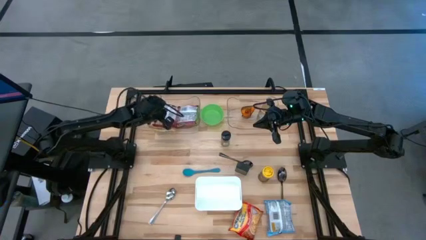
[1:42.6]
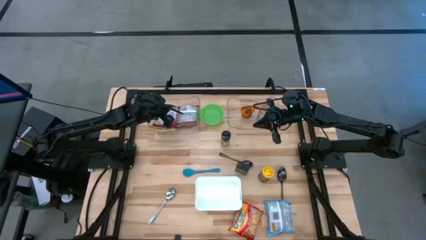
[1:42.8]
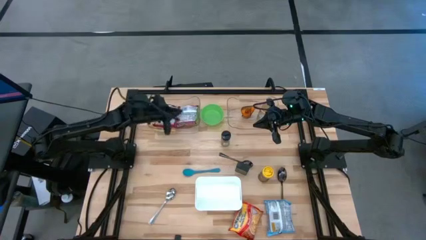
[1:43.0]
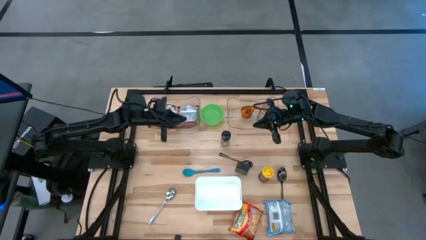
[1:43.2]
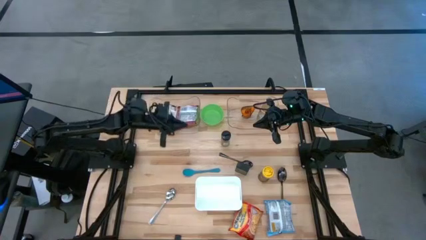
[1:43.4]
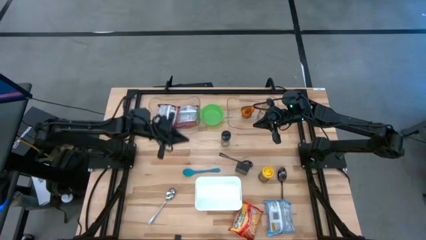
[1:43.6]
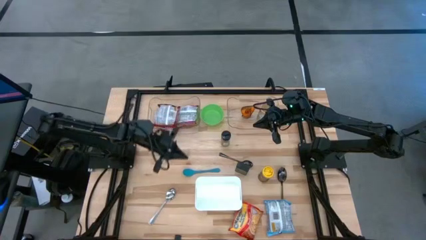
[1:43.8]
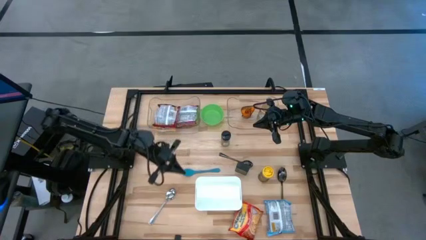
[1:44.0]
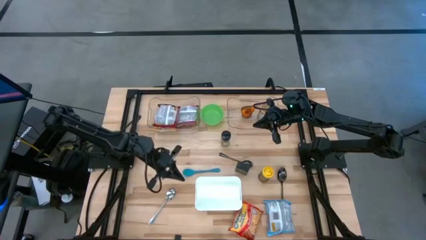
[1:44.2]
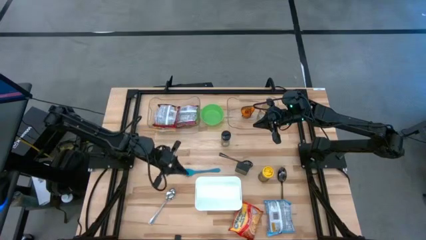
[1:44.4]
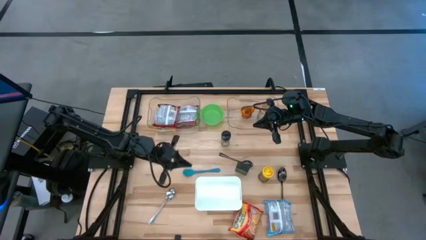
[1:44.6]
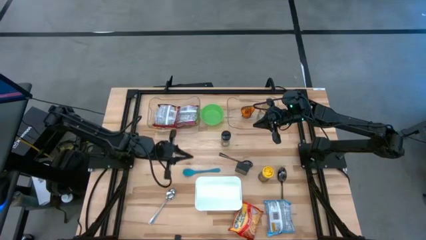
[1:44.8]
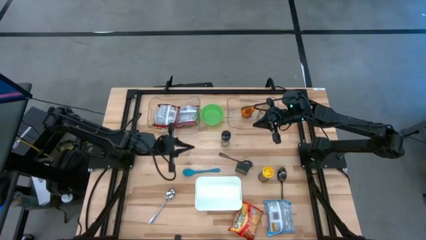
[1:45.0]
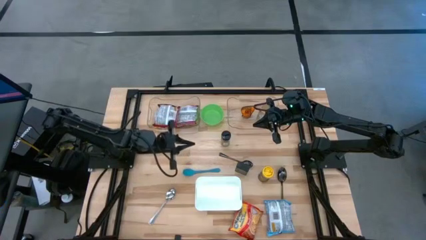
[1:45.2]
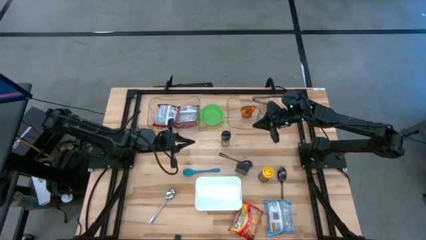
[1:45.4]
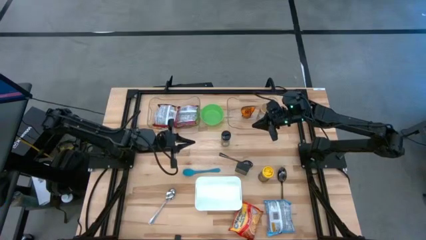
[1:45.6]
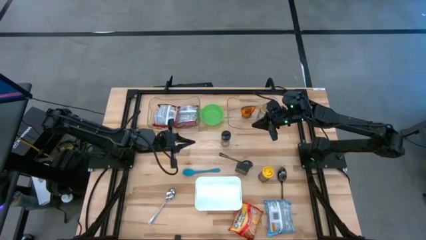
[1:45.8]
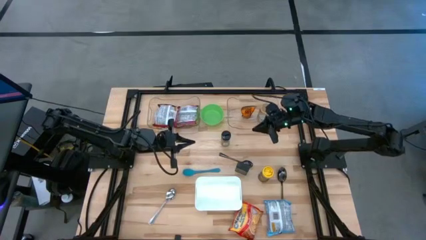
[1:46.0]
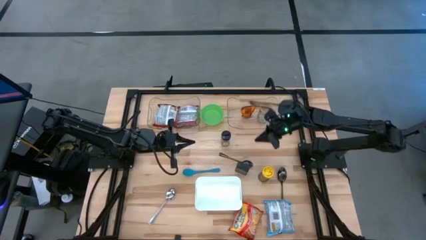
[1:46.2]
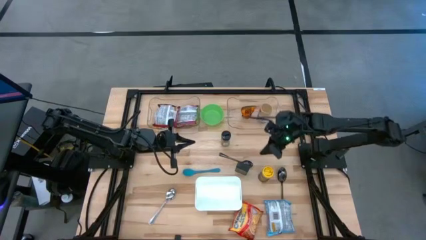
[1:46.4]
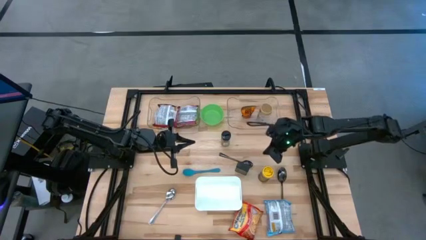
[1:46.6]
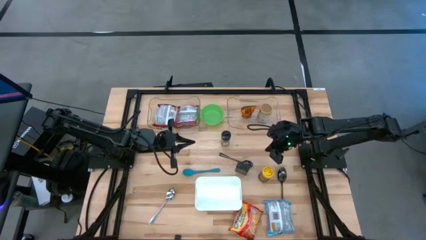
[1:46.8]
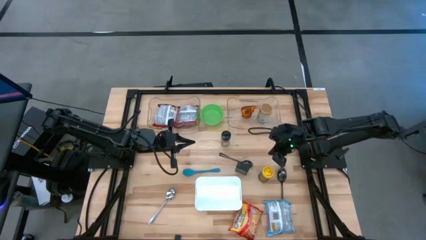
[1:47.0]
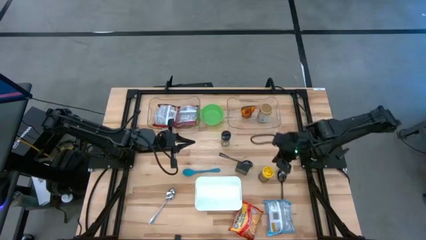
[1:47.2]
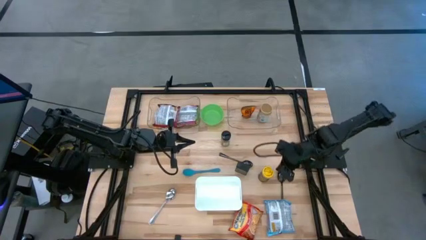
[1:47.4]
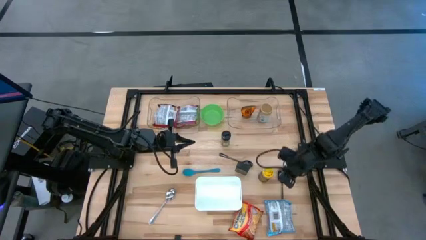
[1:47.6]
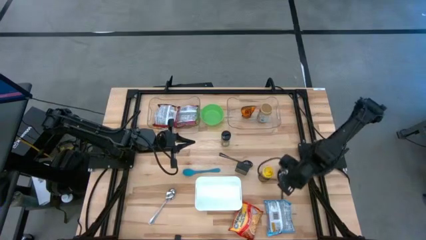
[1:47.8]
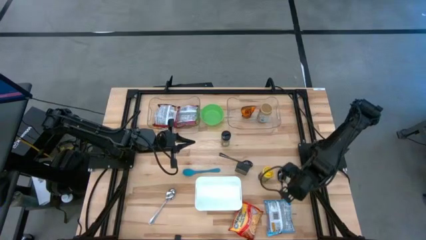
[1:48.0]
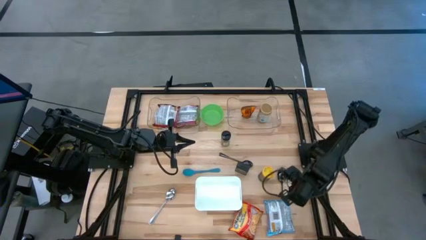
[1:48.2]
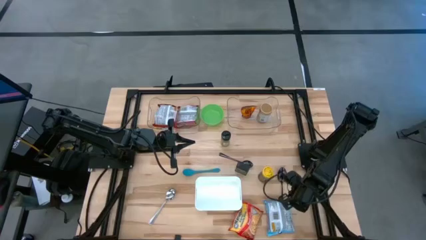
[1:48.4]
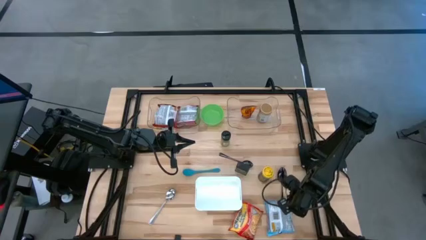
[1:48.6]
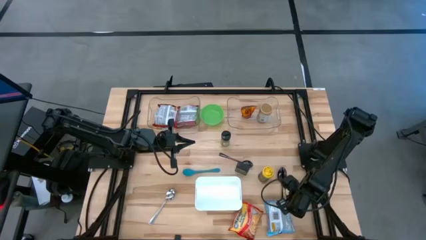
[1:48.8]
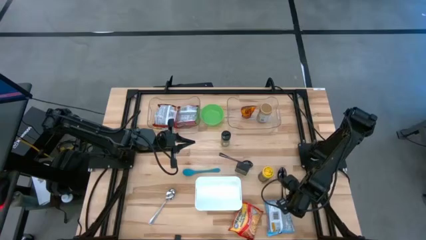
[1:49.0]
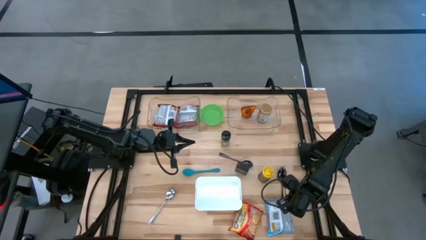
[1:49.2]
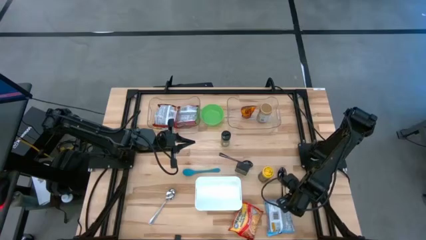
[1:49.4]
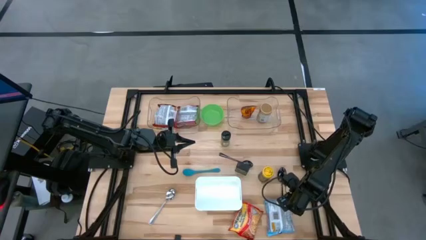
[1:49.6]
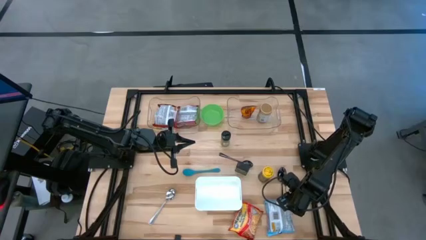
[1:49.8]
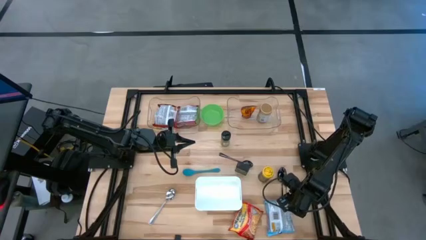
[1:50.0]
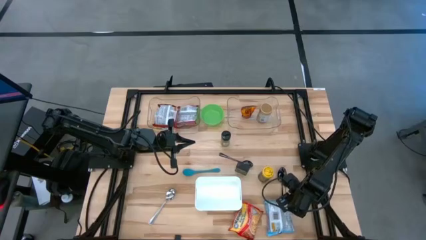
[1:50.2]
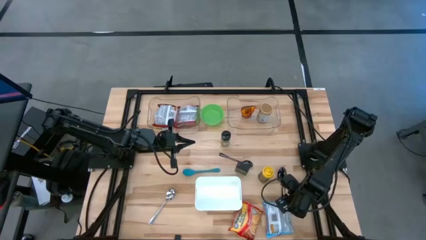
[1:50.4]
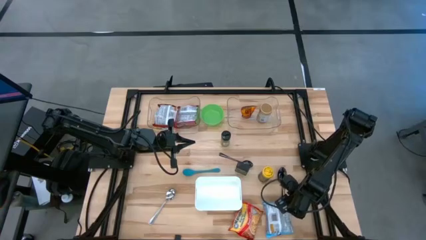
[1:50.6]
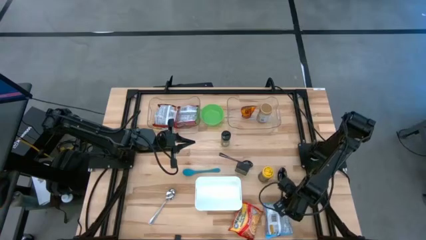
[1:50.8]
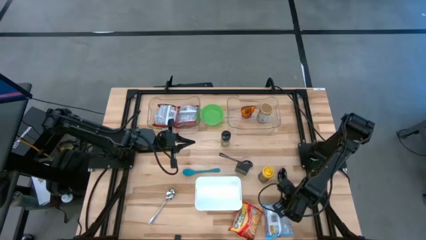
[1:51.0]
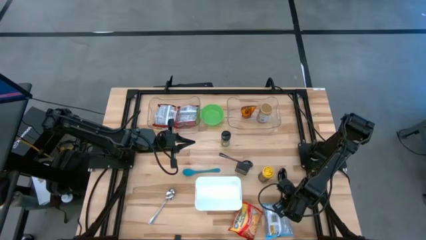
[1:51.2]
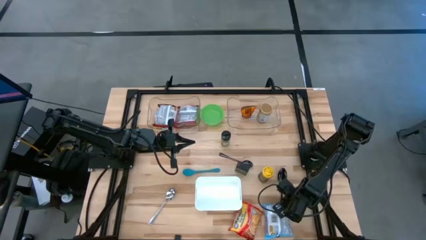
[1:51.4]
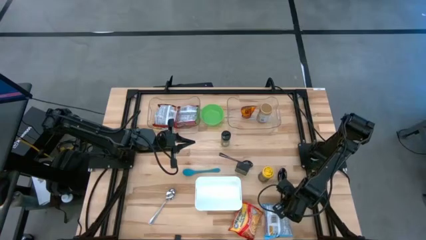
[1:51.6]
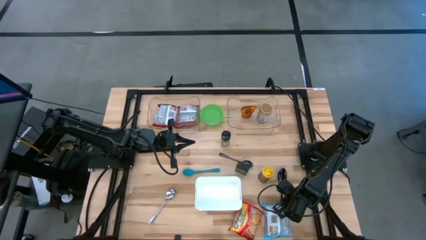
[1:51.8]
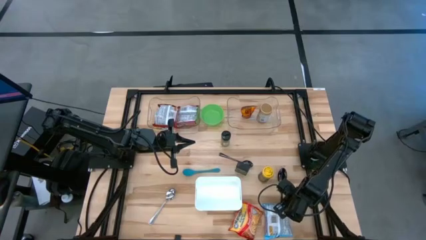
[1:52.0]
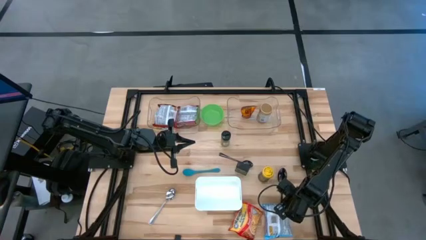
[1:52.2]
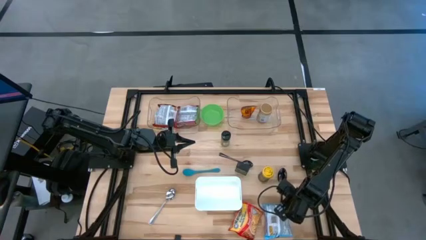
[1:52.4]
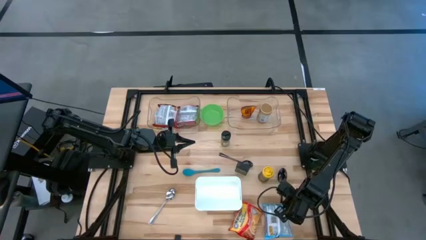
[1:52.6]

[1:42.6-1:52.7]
Task: Pick & Place Food Item
Put the blue noodle pack into the left transparent bin
